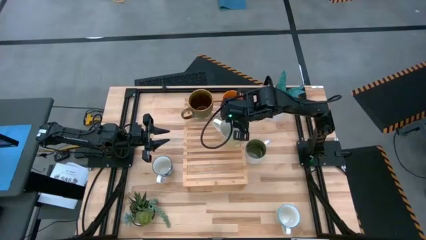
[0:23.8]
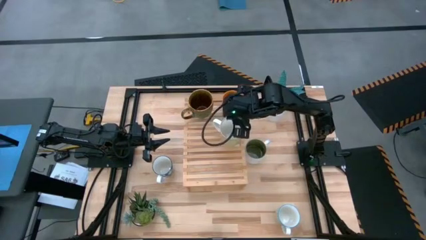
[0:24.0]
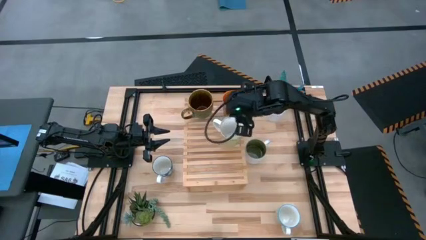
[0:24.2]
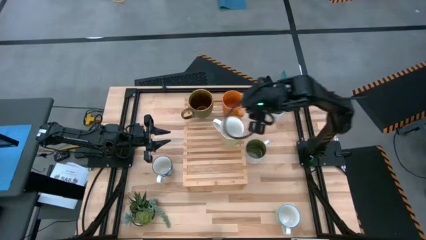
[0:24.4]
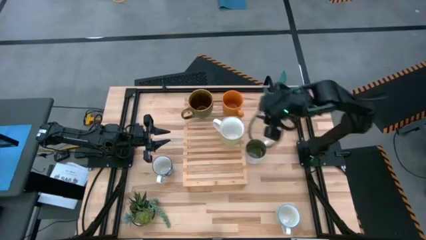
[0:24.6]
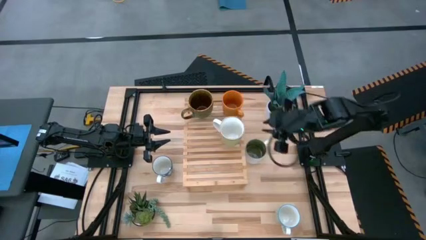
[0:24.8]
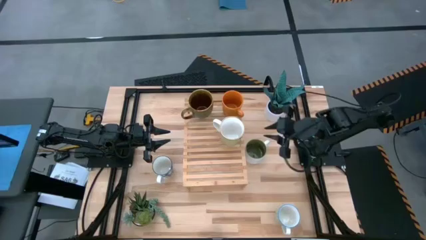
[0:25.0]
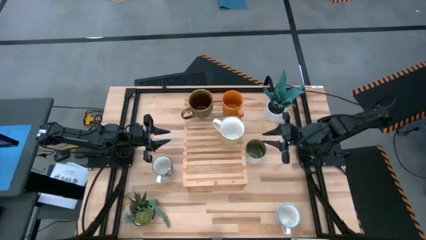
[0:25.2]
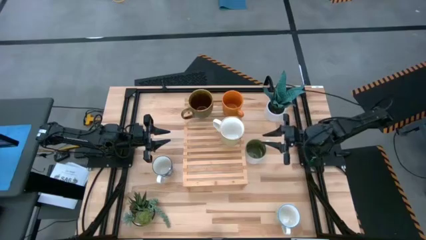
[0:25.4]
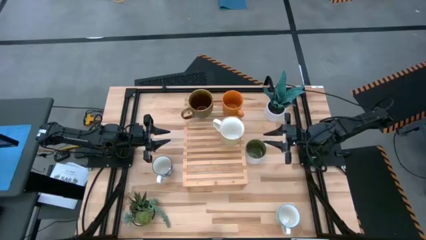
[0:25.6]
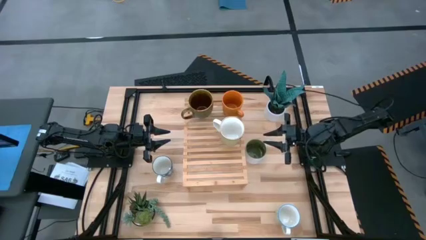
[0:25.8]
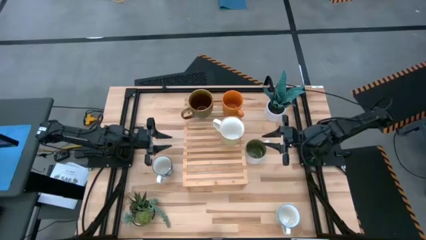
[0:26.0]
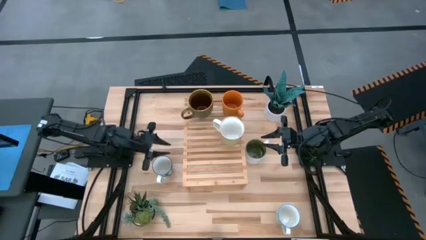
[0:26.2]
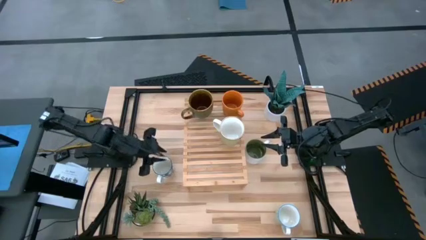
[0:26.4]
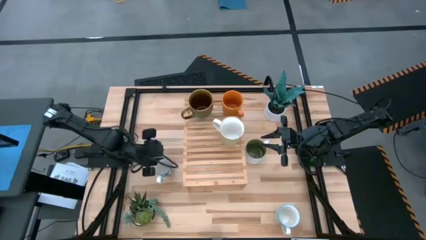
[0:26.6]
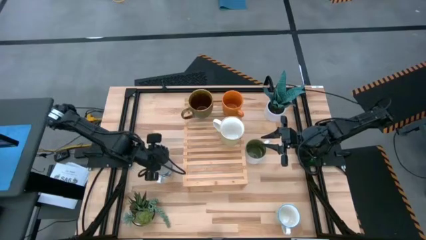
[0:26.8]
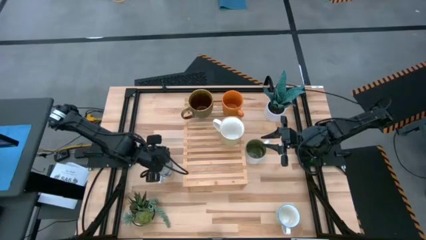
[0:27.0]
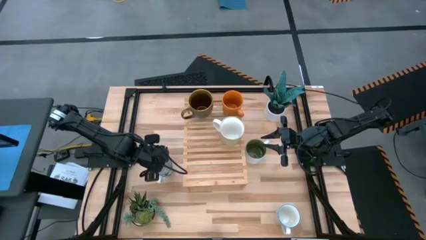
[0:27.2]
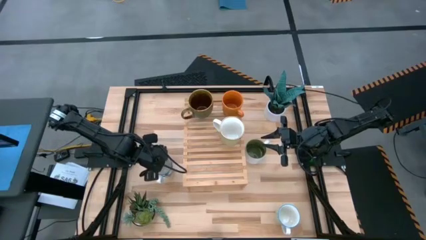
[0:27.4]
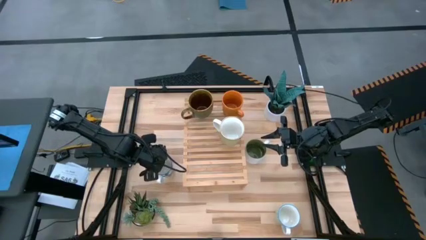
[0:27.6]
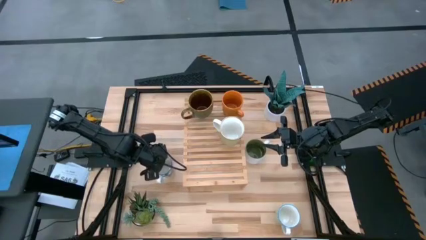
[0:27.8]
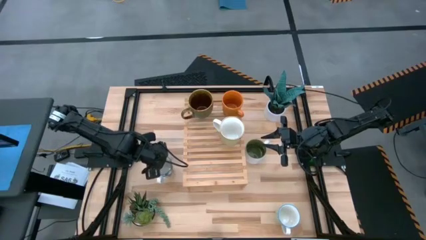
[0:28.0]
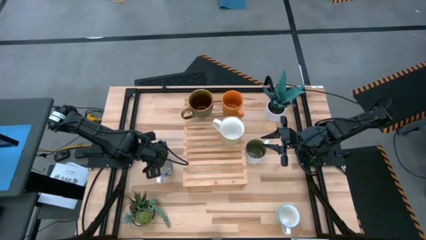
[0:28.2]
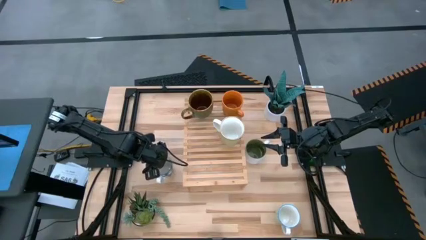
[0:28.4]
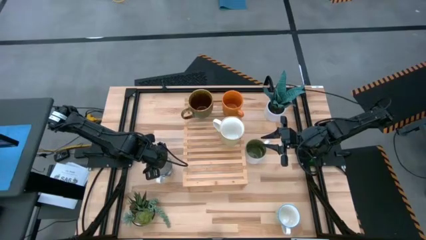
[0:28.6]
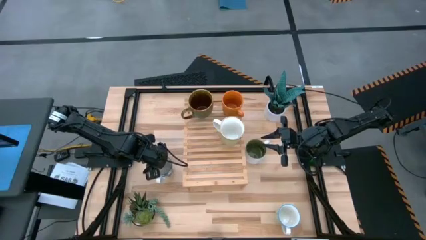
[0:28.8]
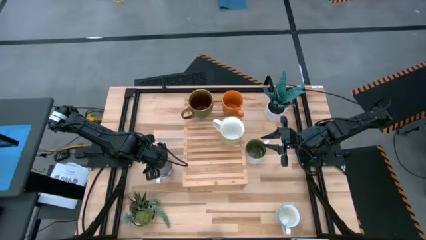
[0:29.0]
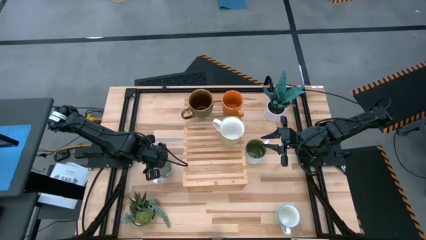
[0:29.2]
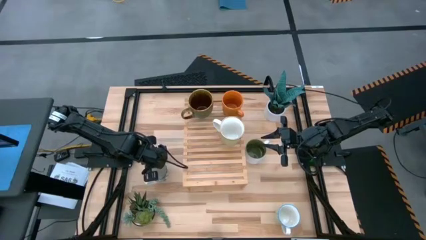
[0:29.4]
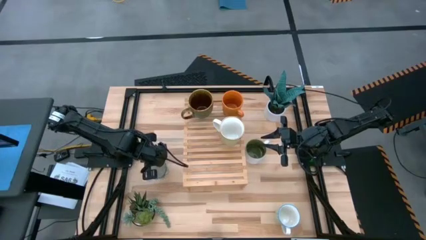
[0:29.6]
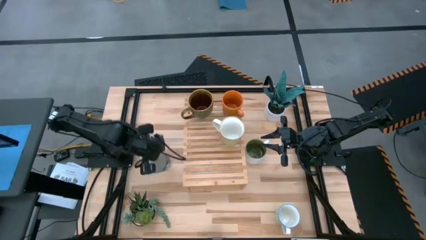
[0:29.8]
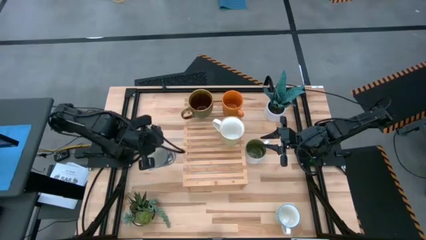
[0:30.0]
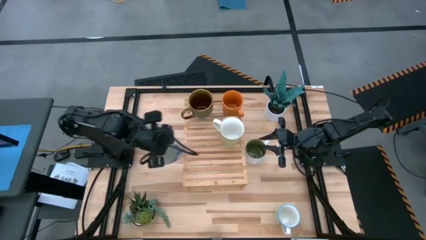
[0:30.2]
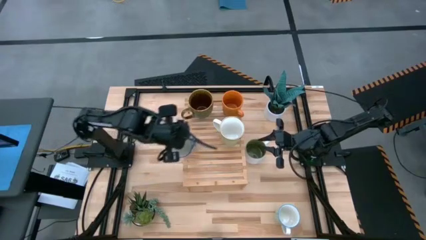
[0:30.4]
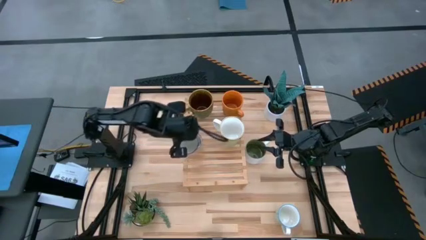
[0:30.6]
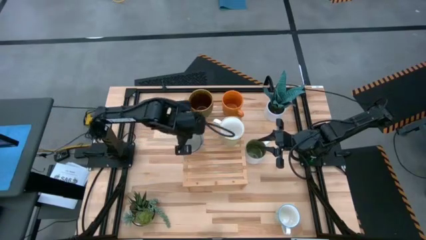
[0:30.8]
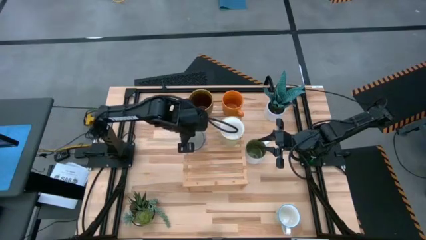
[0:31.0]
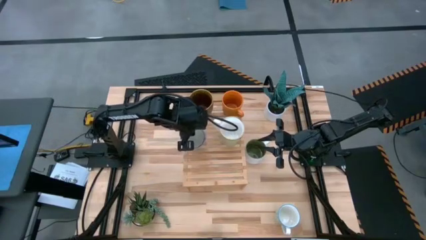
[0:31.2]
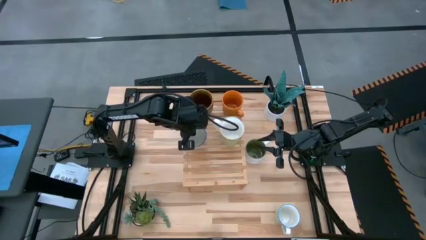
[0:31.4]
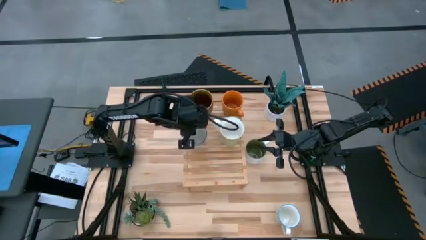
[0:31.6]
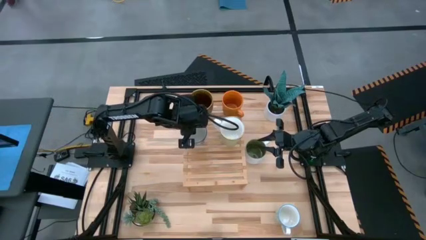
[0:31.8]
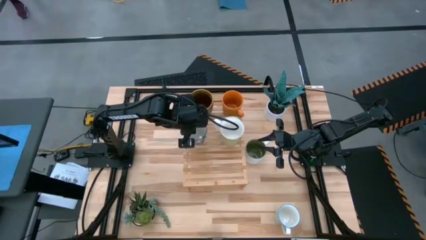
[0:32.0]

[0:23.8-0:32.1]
Task: Place coffee mugs
Put the white blue patterned mug on the shelf

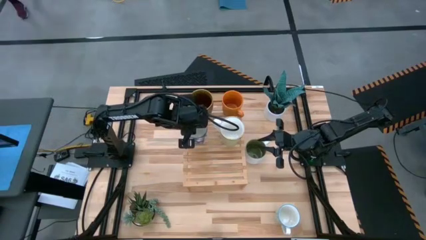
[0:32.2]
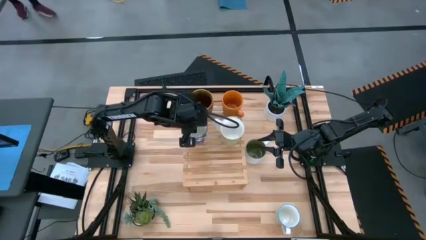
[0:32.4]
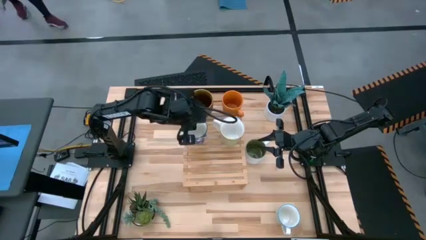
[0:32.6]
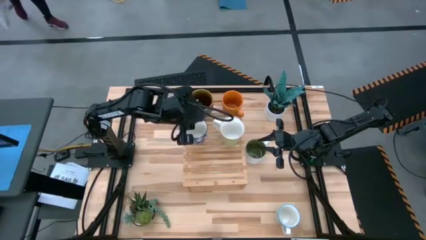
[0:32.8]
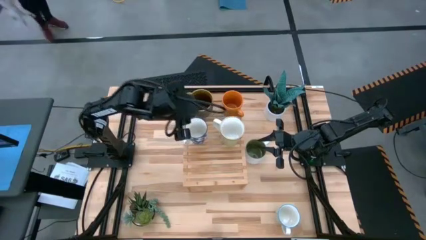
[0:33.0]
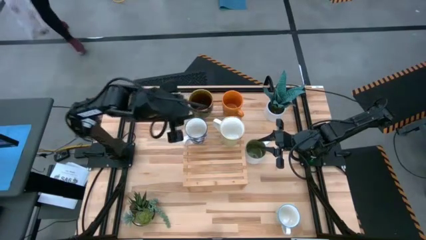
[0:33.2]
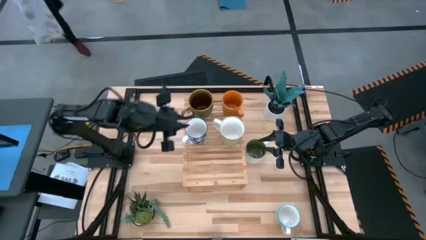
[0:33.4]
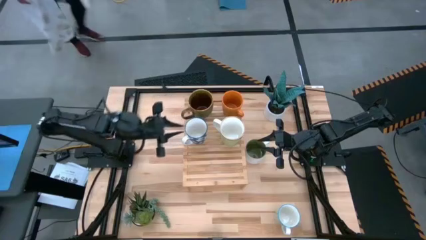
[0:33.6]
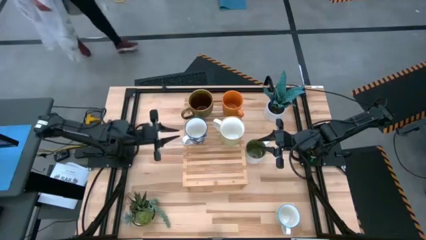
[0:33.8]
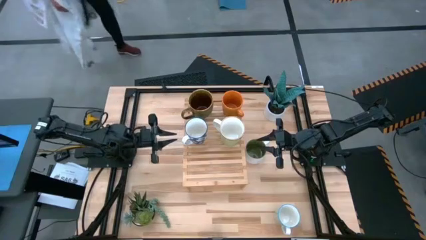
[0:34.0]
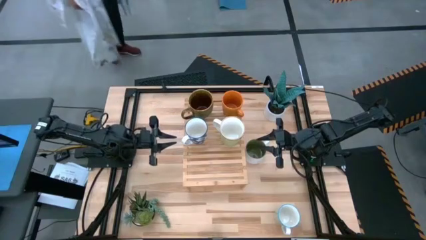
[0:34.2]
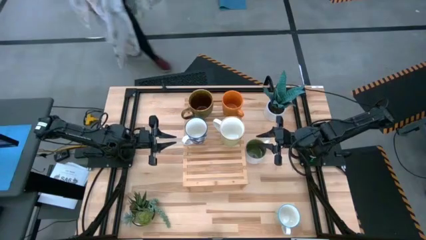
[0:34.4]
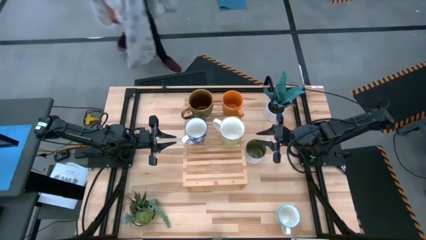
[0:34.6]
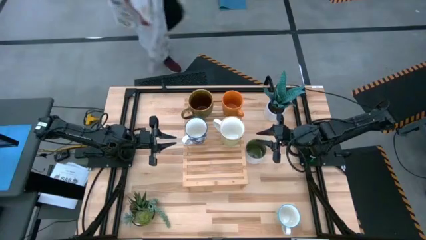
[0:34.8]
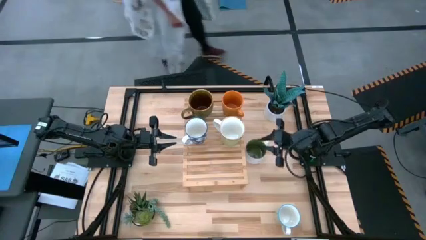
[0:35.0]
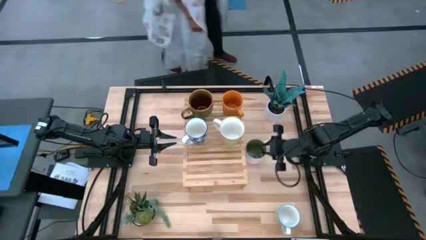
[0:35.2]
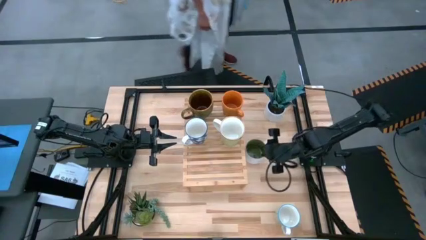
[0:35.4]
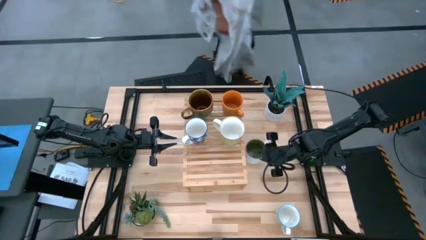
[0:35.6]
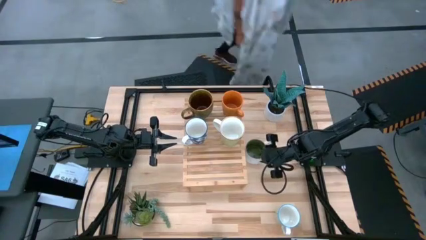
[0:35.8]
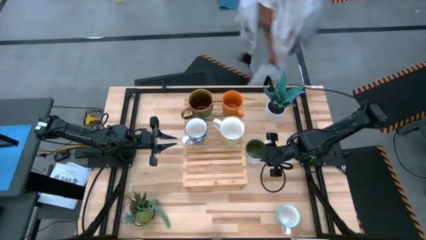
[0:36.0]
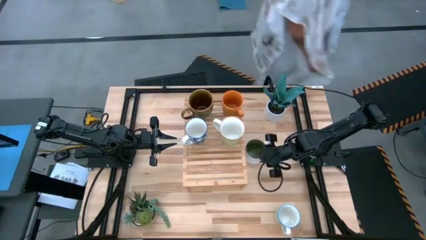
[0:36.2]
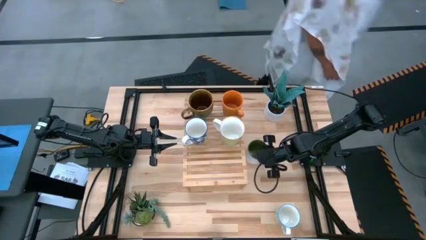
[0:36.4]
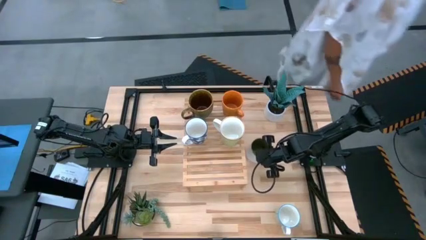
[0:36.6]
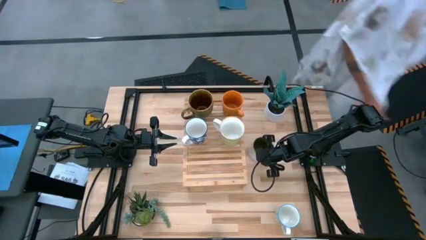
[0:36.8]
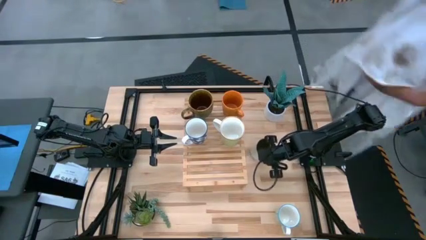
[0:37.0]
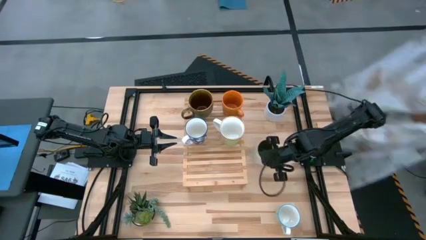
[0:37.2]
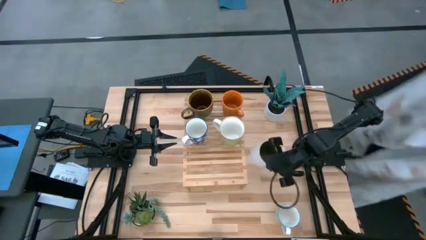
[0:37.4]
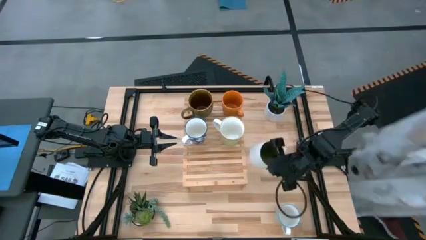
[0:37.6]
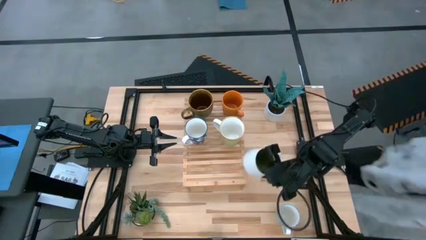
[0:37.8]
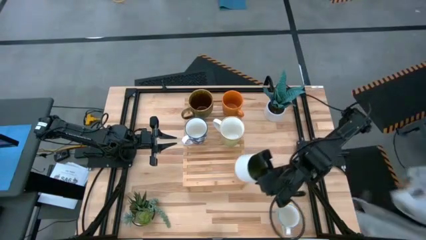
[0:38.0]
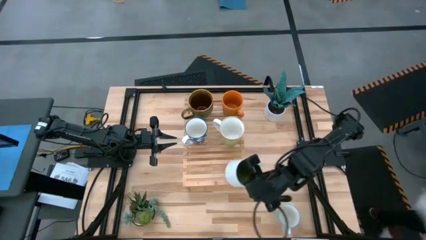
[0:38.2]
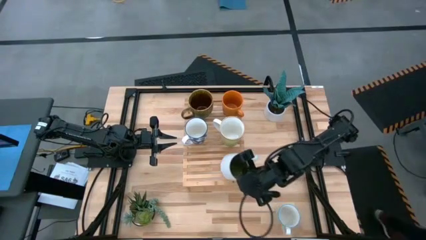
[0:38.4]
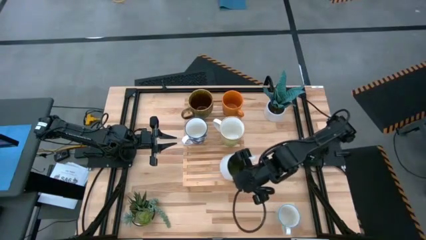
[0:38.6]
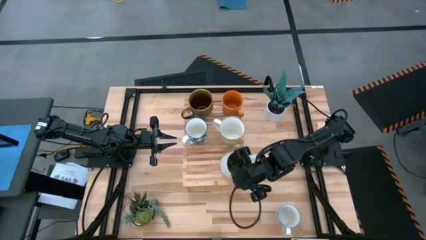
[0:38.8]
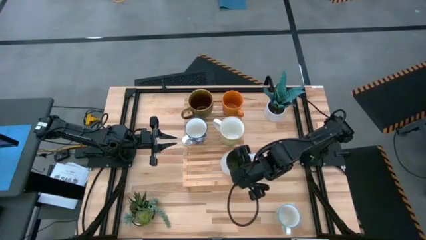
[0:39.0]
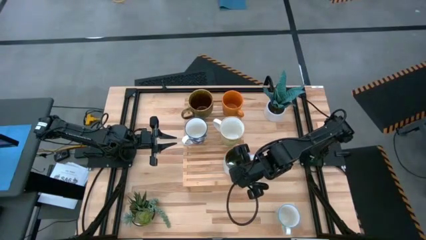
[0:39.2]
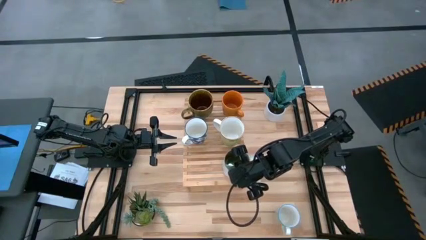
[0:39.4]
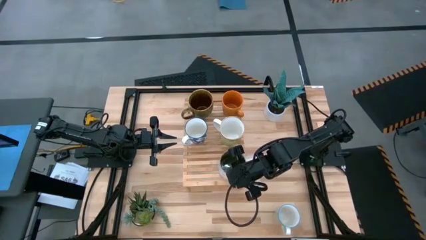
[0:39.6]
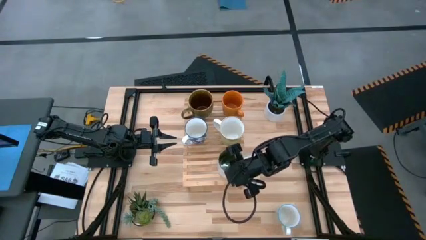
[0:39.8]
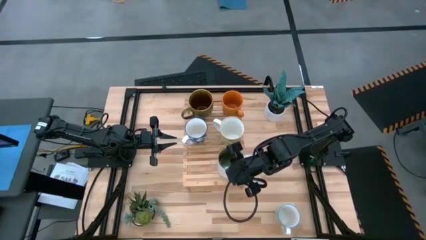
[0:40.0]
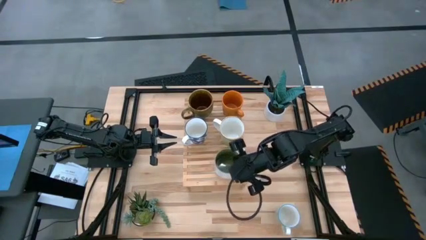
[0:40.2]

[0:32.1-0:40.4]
Put the white green mug on the shelf
